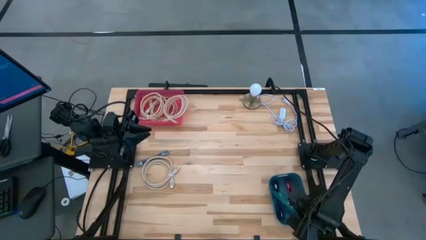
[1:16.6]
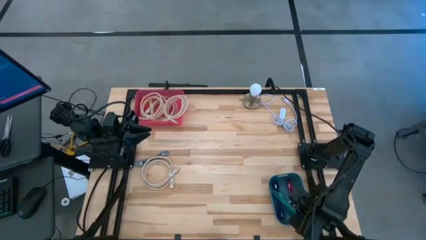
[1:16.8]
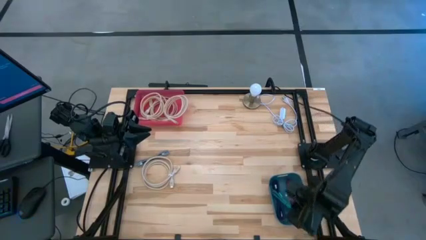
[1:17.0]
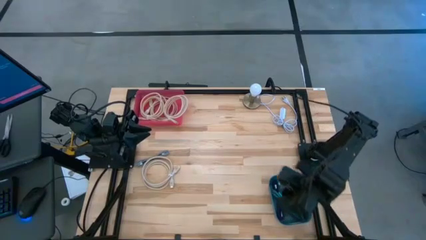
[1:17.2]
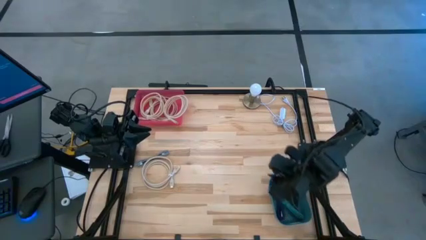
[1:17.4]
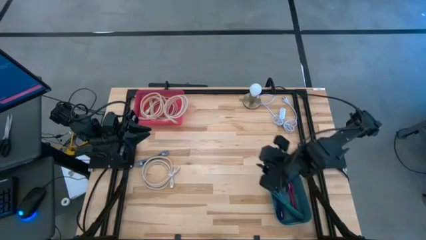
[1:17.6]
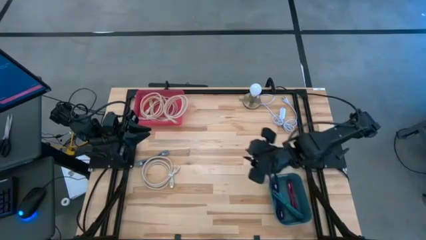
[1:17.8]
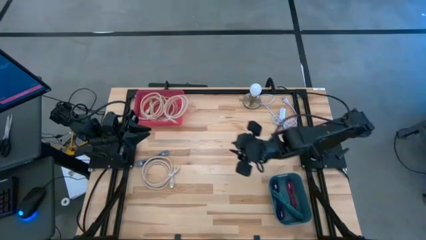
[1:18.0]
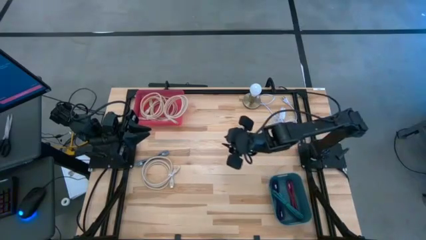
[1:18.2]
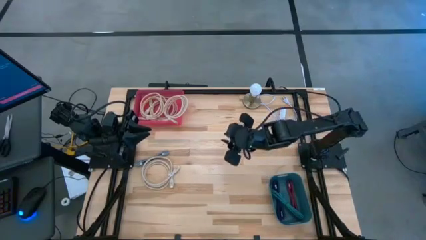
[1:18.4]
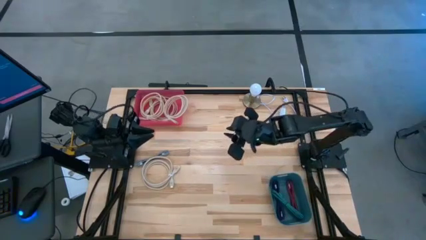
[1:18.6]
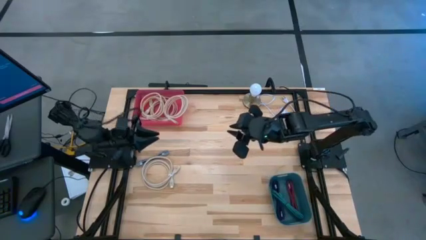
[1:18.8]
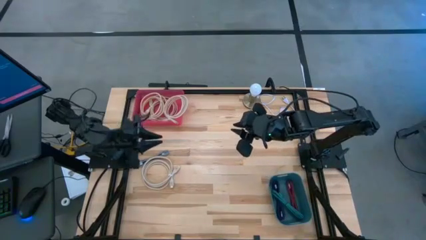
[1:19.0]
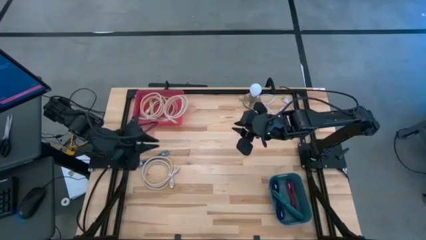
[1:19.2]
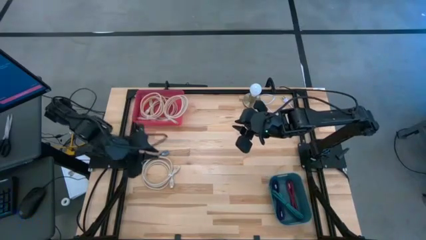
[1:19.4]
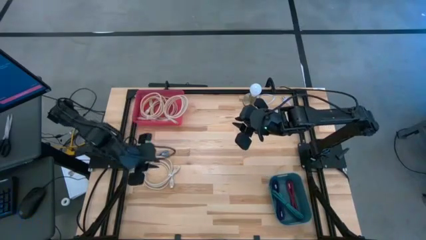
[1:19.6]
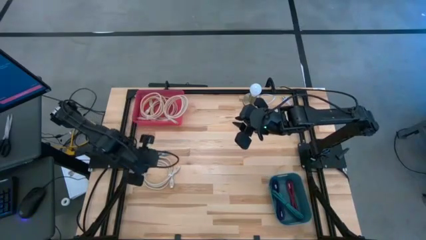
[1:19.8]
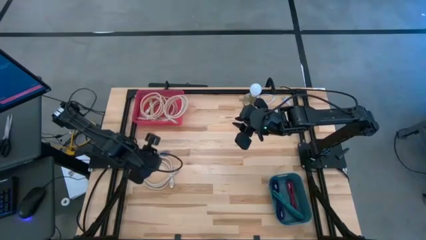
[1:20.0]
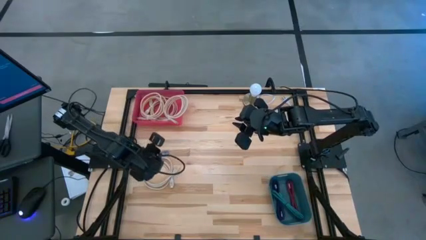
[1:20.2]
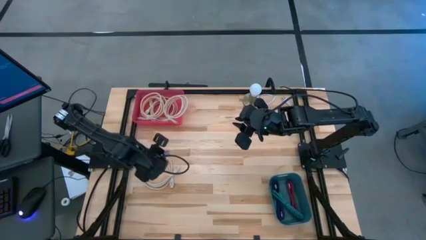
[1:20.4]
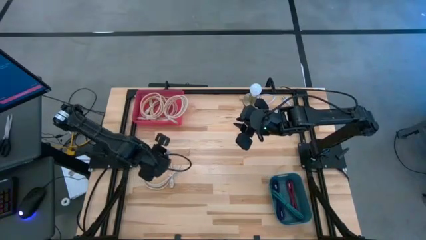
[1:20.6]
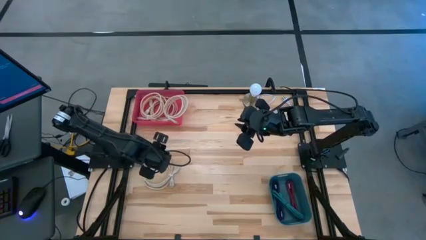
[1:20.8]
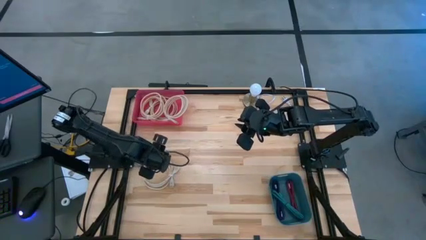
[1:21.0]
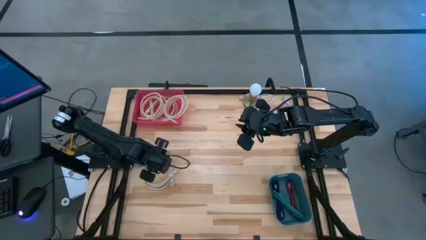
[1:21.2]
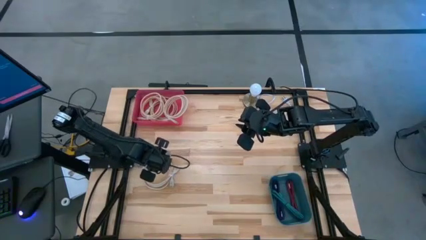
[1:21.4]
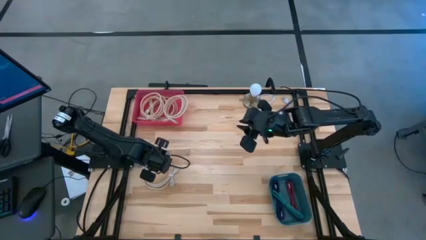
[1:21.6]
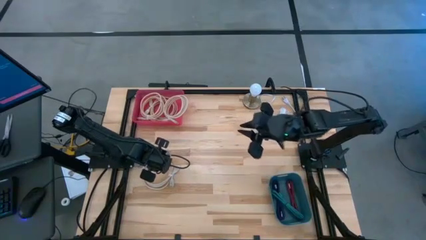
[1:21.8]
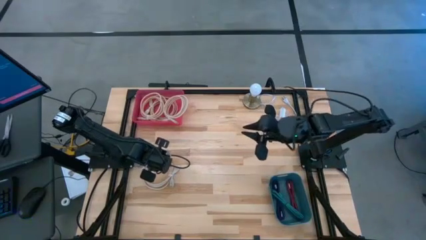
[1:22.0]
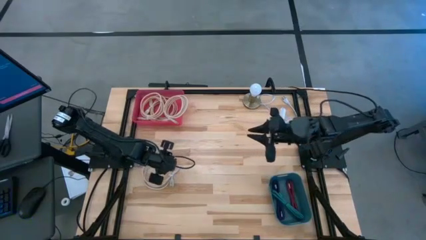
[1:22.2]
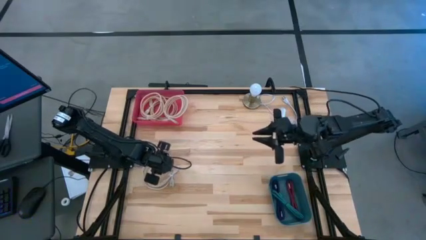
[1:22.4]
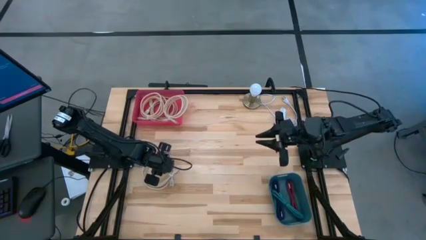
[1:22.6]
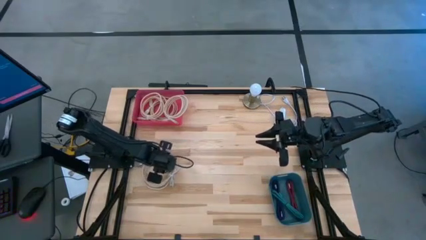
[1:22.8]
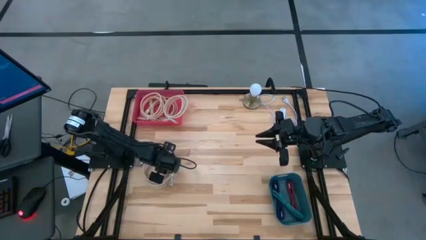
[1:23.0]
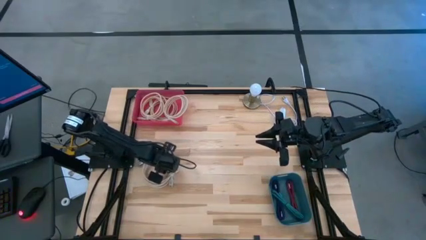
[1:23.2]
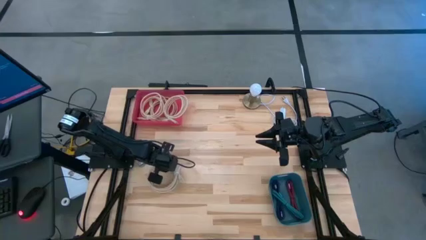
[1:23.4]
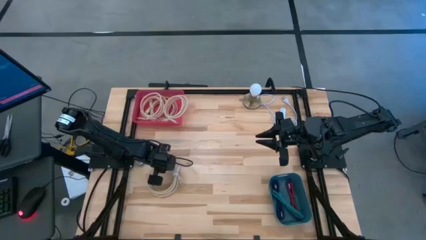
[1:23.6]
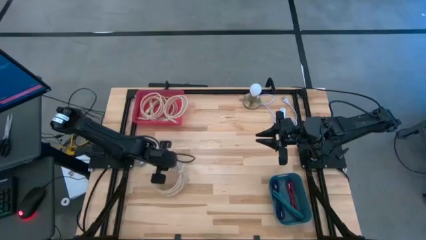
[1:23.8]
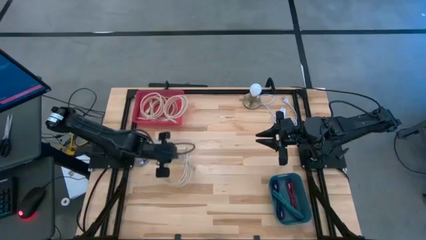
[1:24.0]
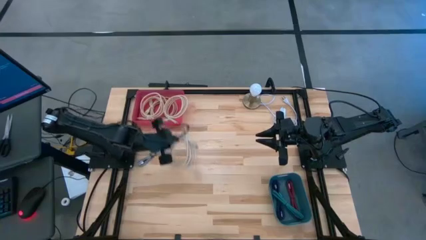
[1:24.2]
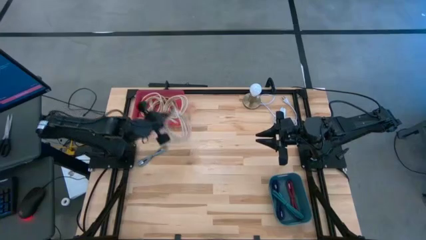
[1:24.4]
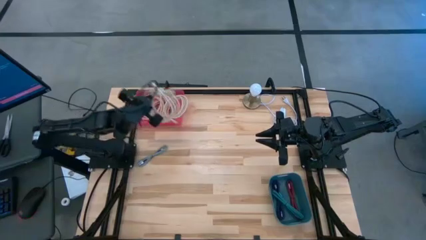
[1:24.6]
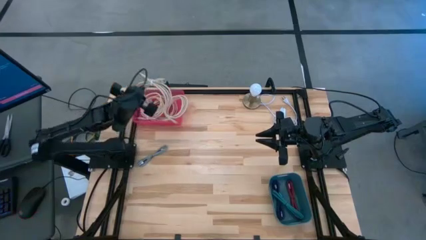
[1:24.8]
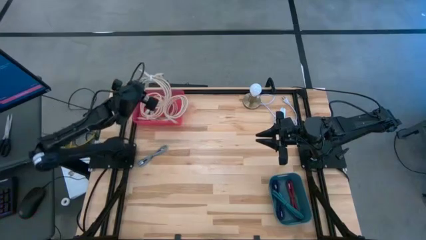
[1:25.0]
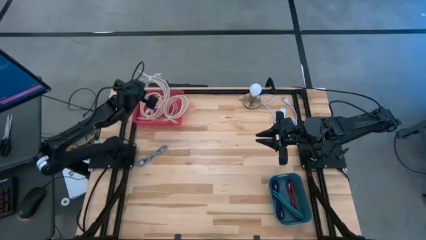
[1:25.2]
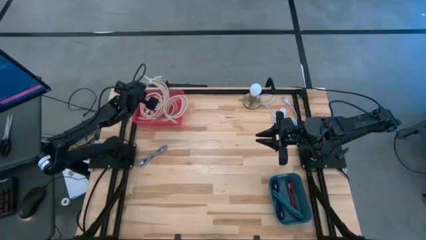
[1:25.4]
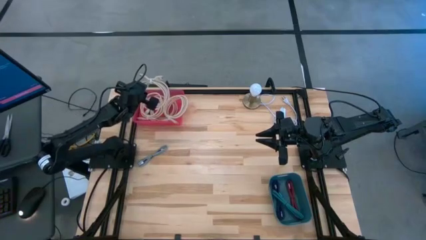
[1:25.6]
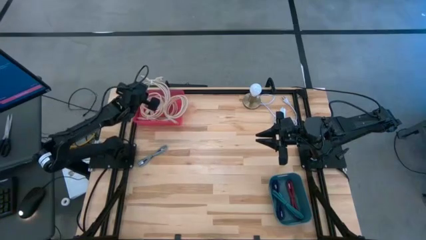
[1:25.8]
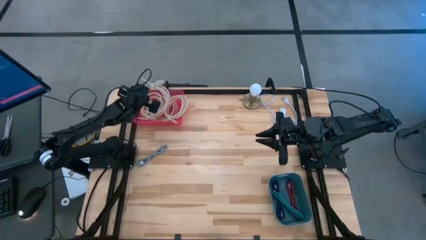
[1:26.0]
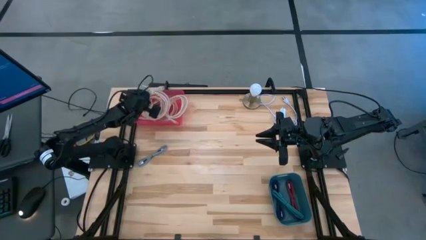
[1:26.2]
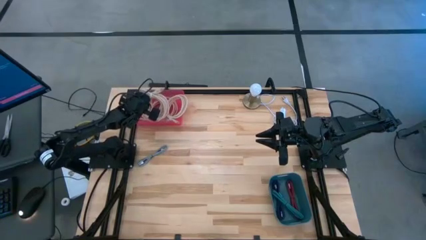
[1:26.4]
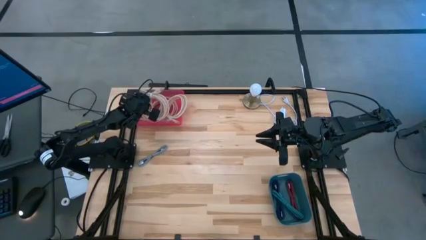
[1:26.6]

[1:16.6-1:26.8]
Task: Pick & Place USB Port
Put the brown USB cable into the red bin

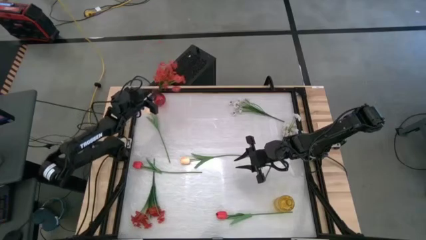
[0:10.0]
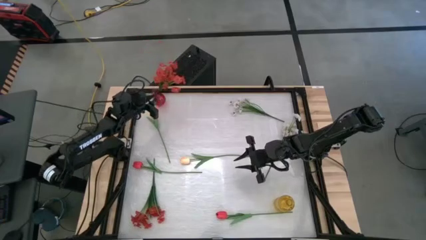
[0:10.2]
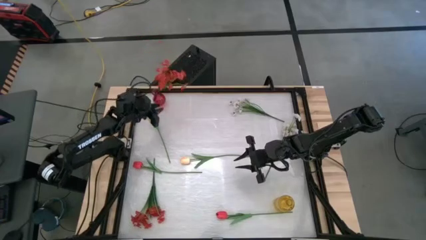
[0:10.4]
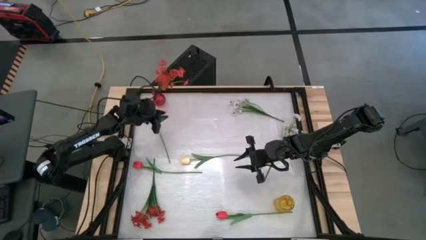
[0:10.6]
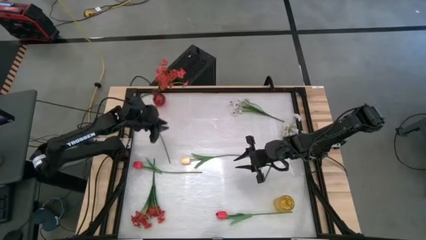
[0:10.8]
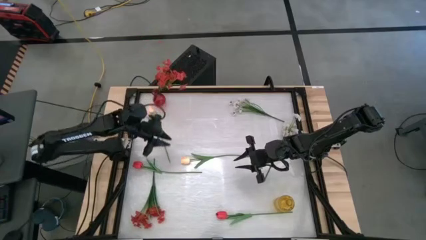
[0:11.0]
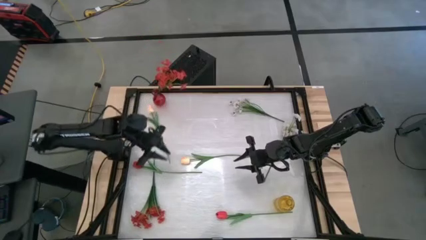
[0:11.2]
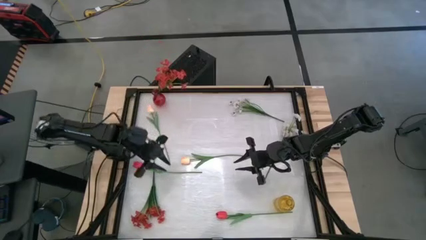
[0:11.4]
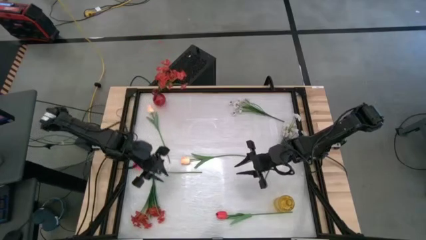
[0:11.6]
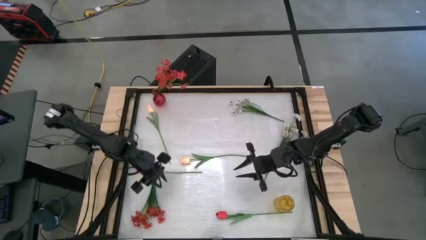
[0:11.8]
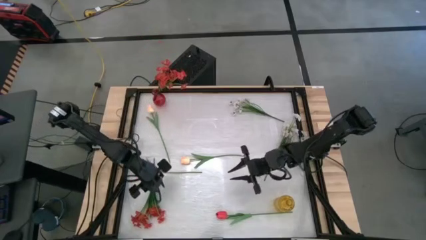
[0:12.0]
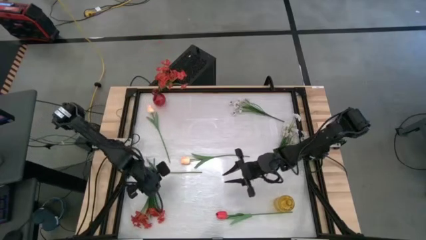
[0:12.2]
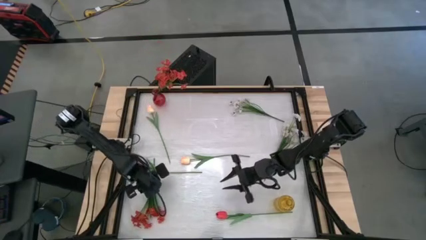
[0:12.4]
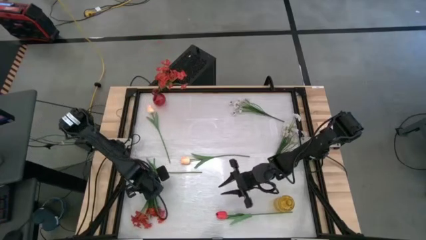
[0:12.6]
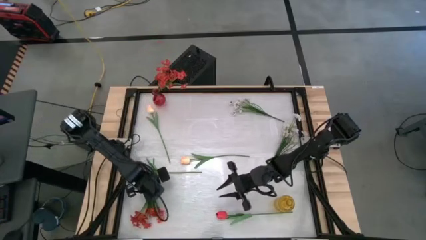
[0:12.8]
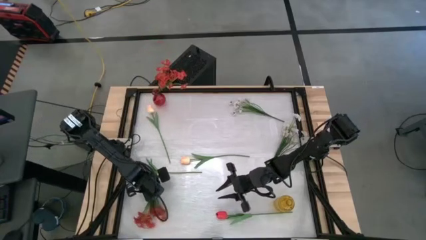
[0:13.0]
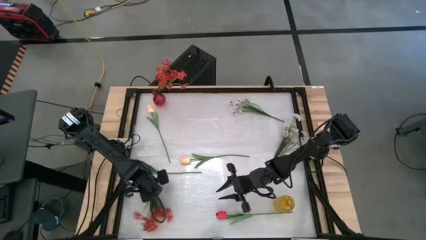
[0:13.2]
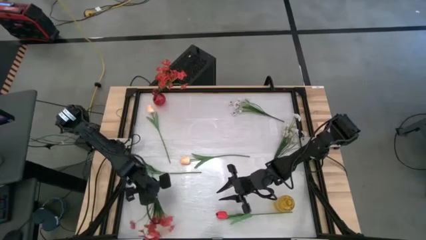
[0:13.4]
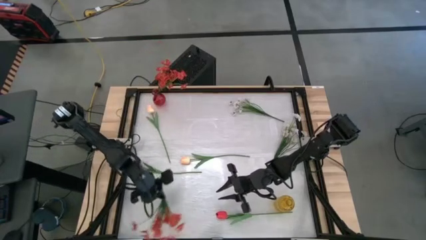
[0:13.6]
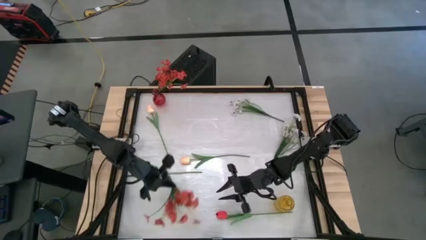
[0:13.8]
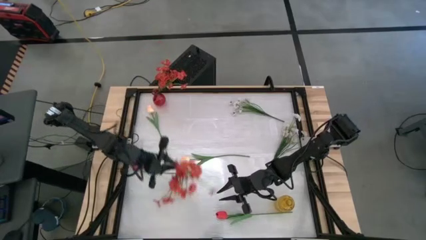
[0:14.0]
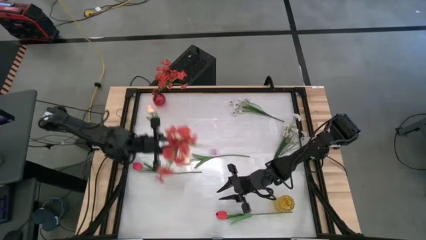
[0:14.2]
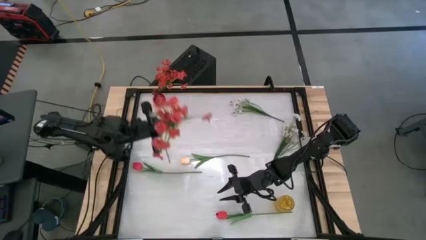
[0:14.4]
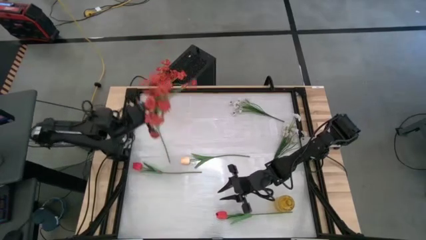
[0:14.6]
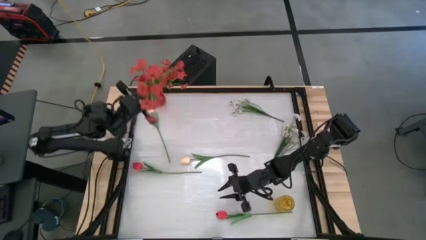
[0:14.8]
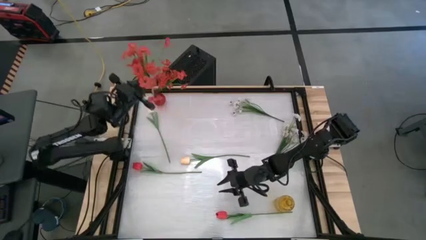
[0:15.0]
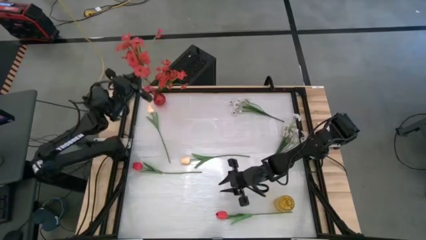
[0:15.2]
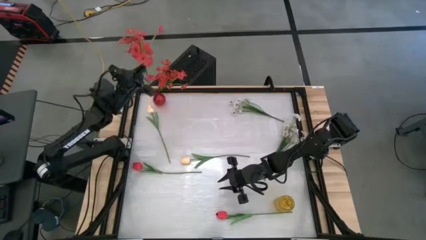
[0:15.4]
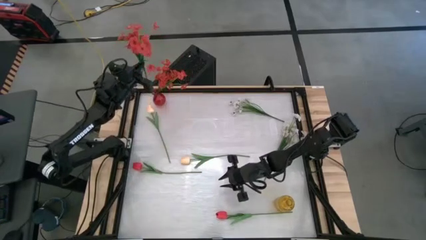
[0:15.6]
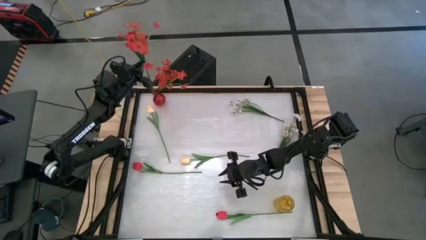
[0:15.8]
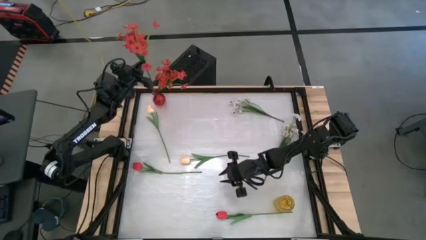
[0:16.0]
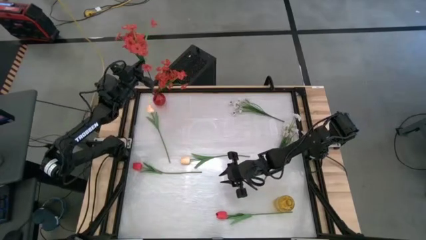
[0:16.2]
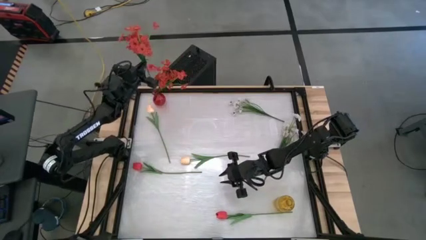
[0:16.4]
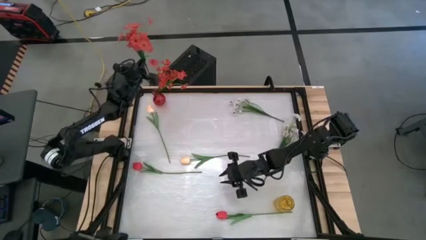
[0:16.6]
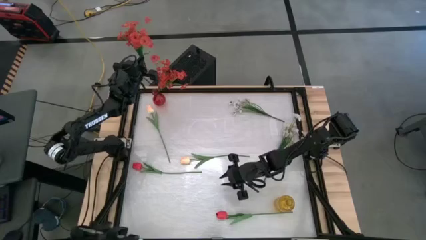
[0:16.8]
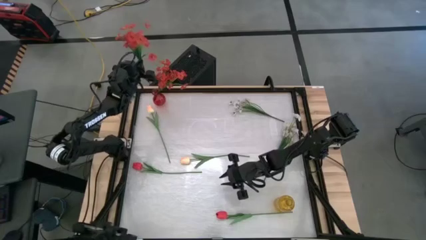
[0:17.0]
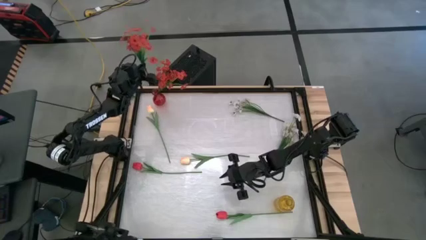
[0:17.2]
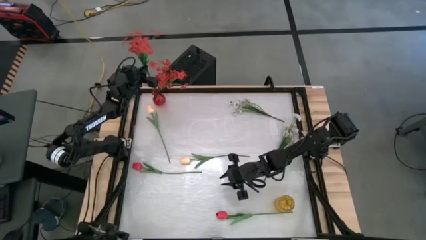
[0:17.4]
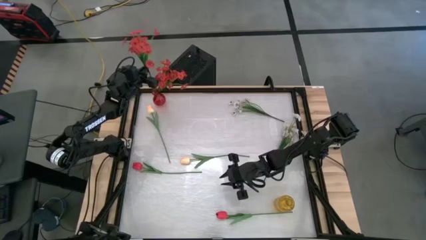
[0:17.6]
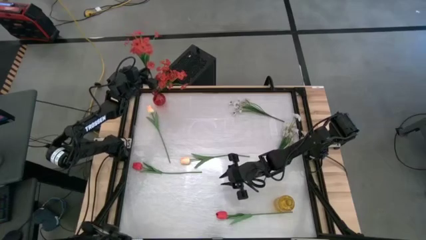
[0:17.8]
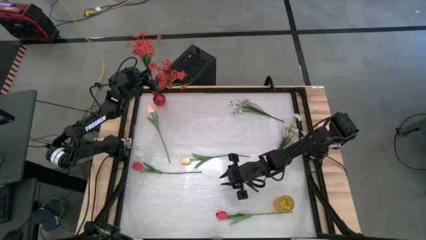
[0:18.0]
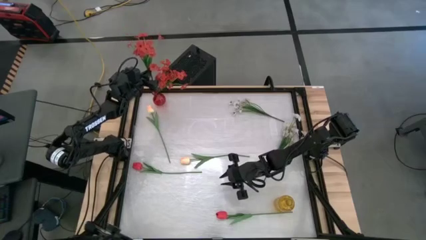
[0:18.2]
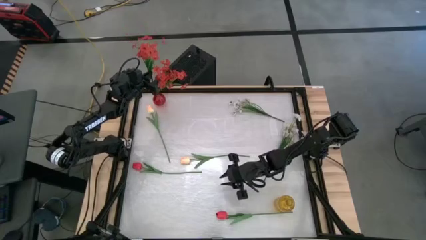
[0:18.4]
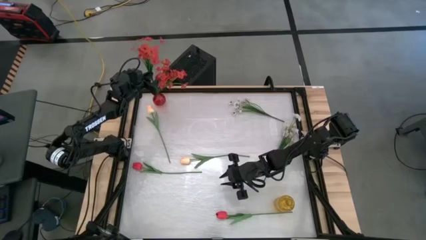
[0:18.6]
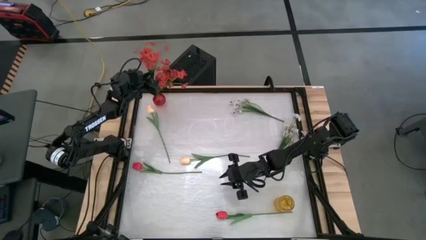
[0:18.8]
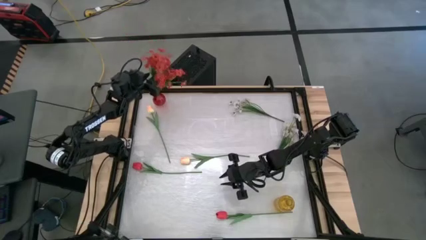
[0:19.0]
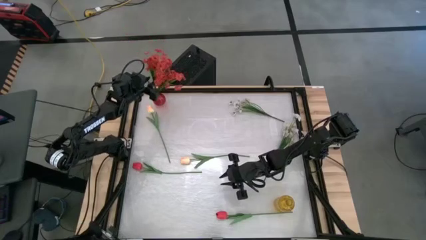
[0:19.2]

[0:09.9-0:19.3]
Task: Sort flowers into vase by color
Put the red flower into the transparent red vase
